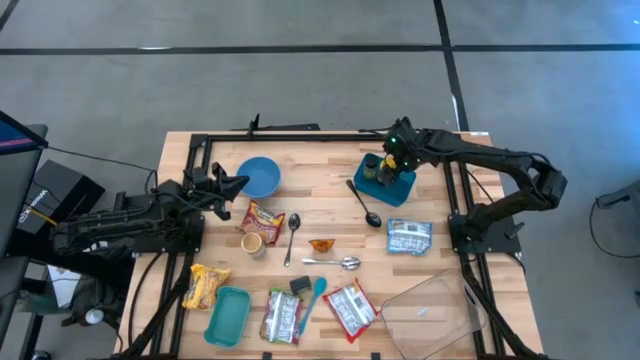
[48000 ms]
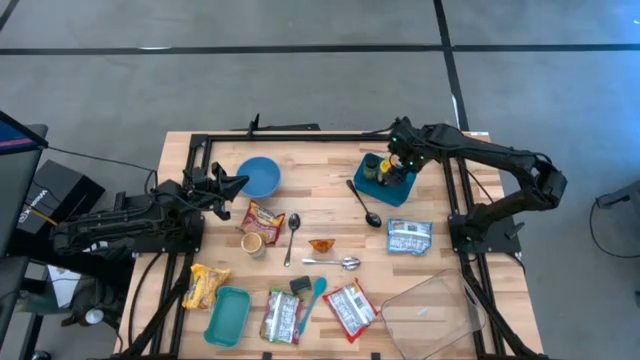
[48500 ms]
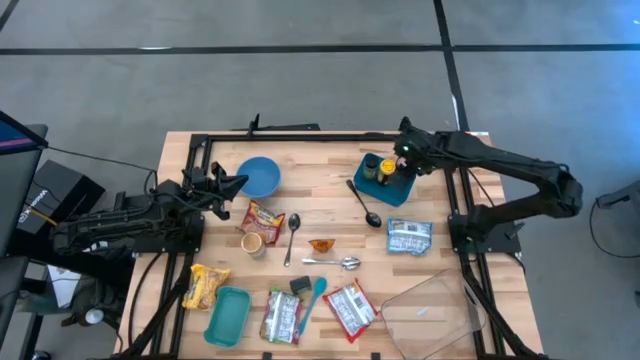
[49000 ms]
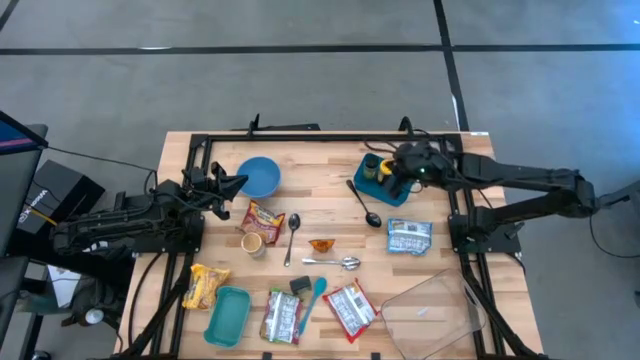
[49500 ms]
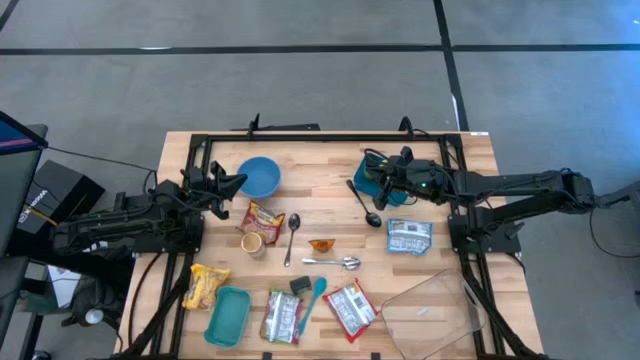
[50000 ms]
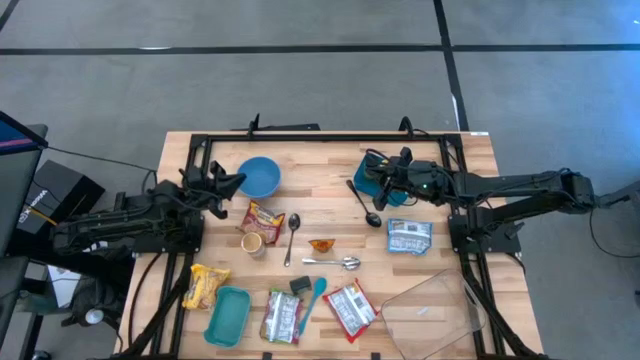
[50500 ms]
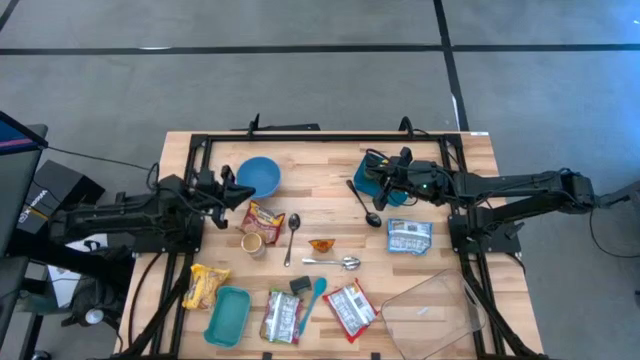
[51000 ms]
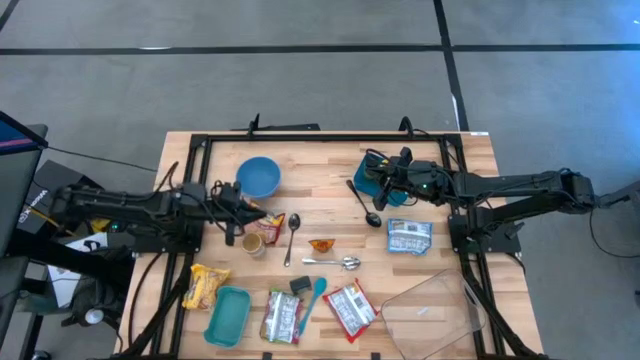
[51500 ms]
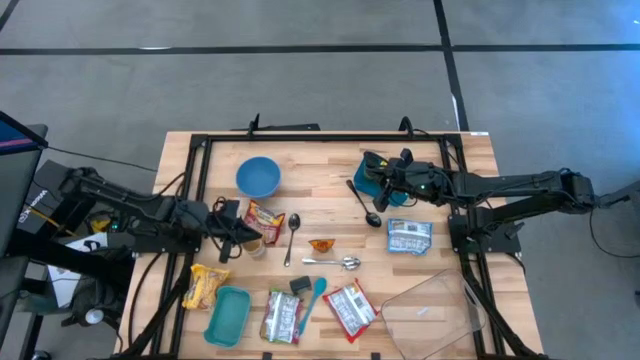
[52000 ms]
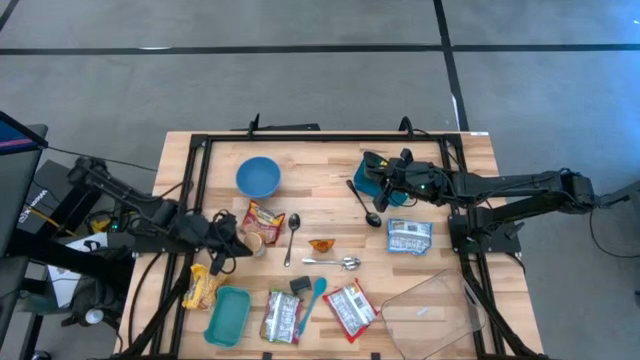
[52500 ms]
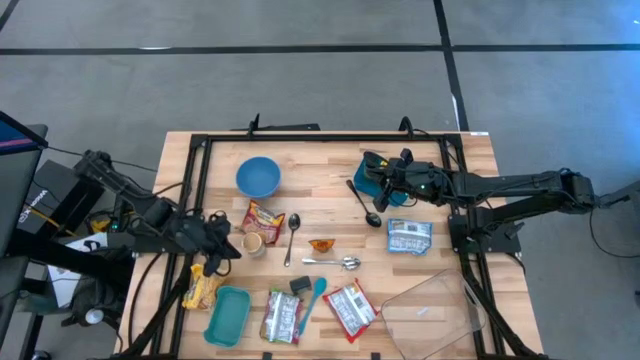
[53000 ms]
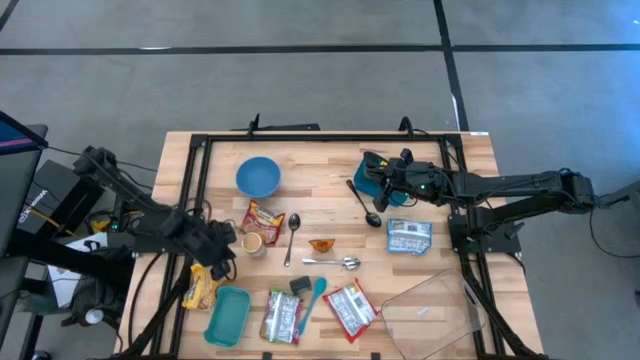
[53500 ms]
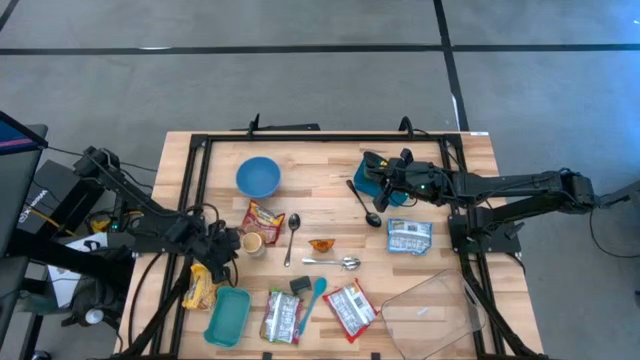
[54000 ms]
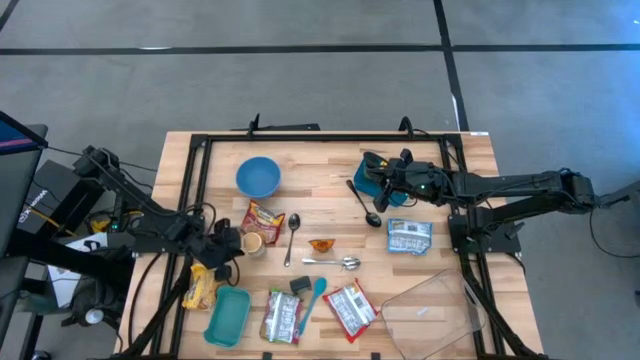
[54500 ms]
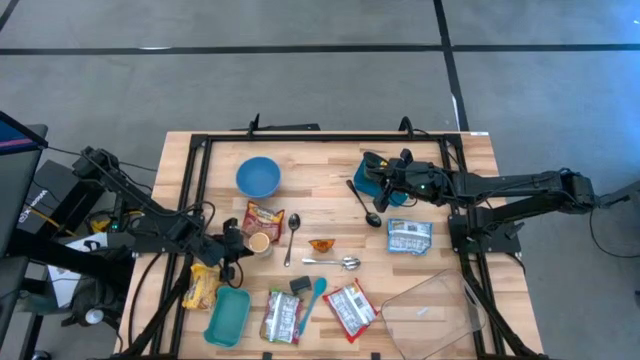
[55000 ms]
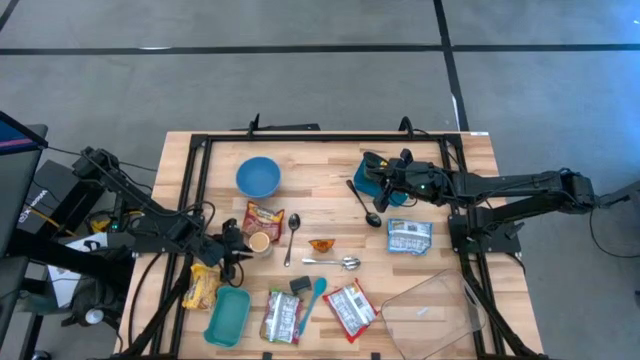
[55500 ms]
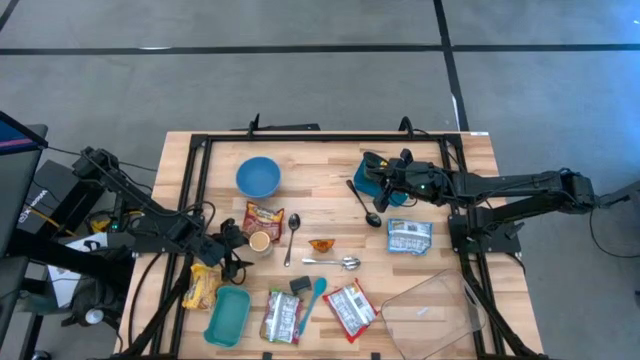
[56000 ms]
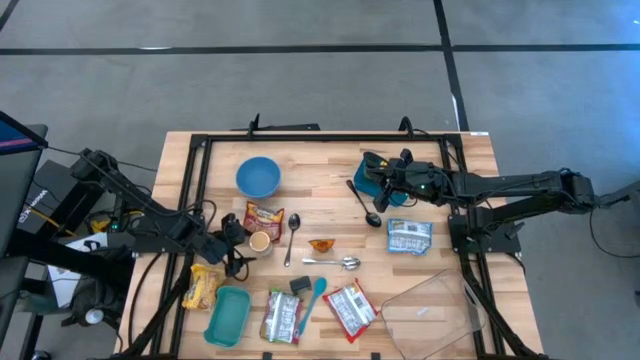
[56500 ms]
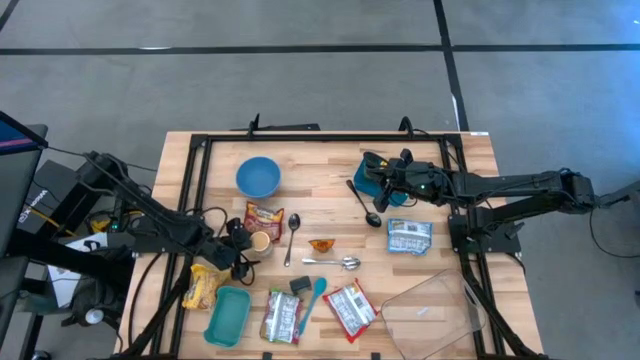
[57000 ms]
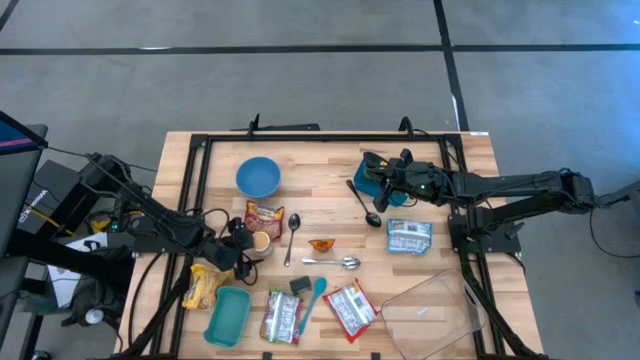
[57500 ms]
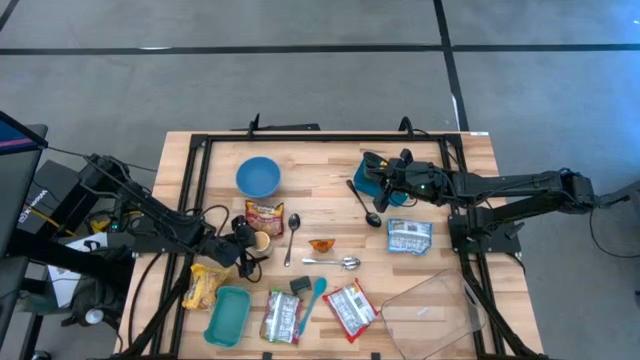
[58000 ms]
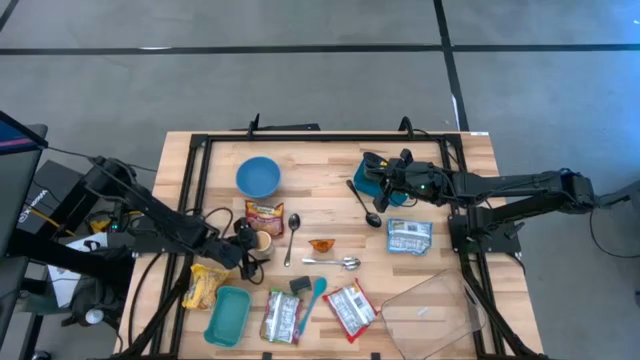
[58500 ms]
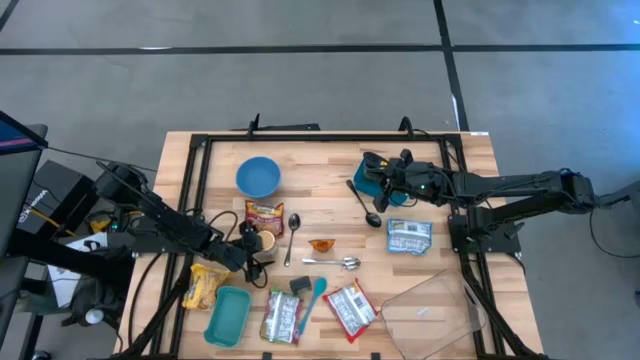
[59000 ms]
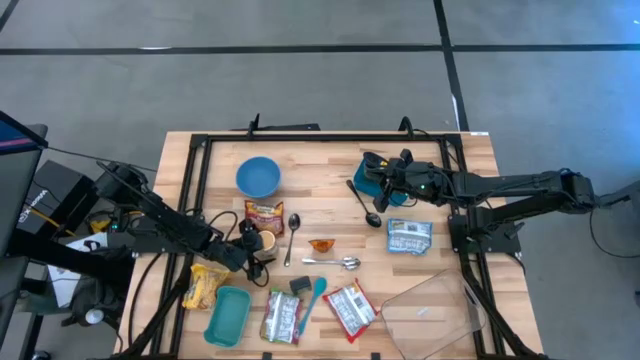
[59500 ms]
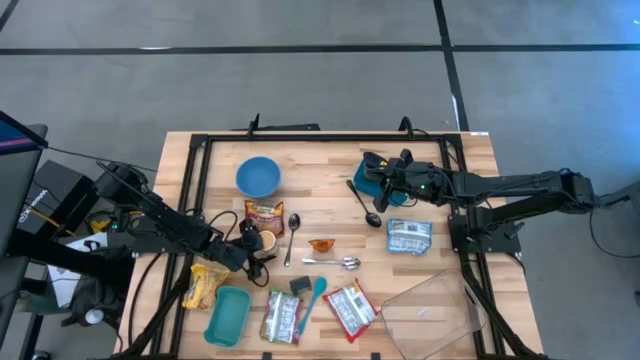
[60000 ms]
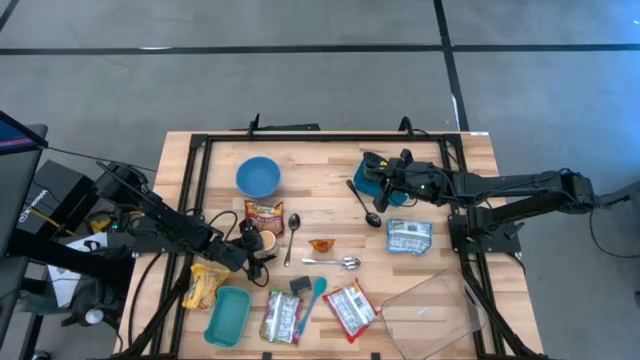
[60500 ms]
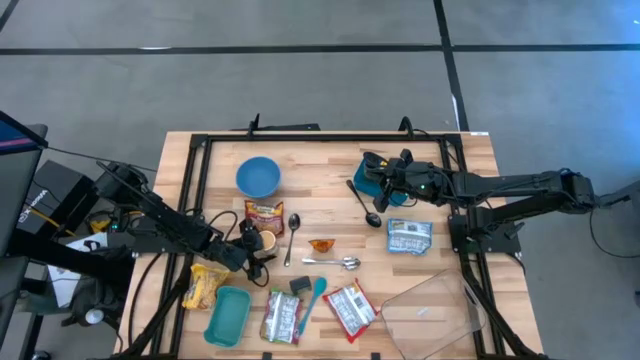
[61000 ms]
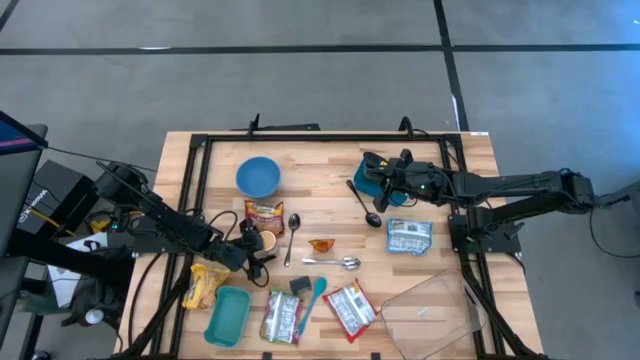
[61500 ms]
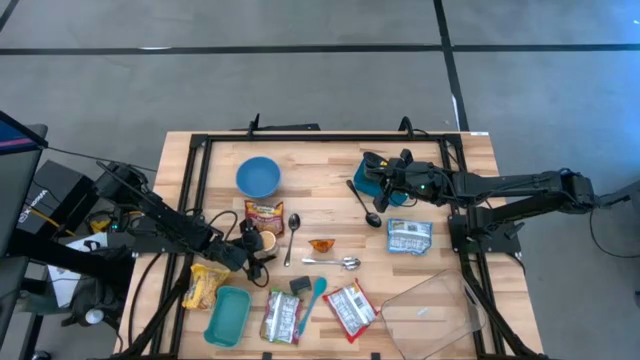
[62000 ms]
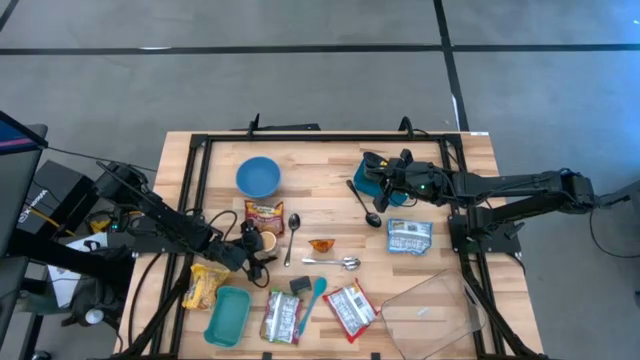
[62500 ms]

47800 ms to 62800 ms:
Task: Pick & Place Food Item
Put the golden seasoning bottle into the blue bin

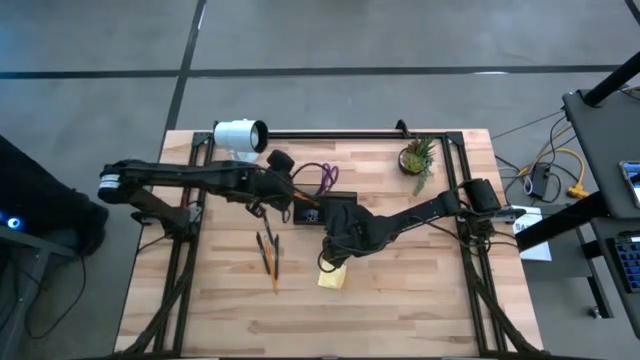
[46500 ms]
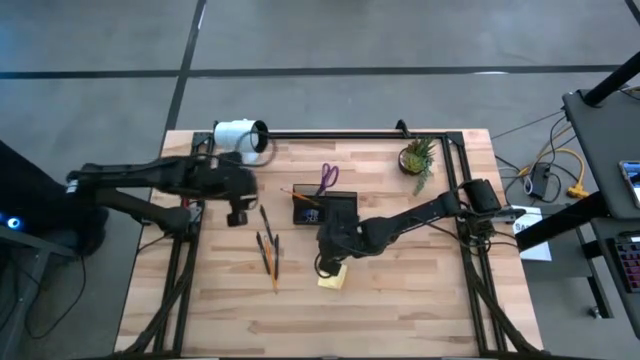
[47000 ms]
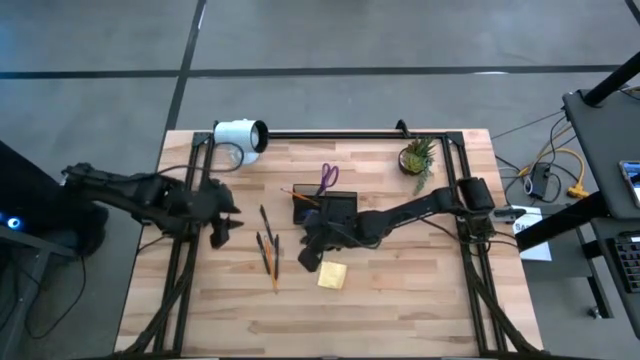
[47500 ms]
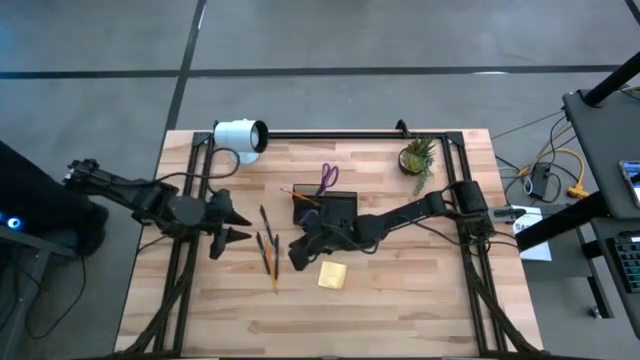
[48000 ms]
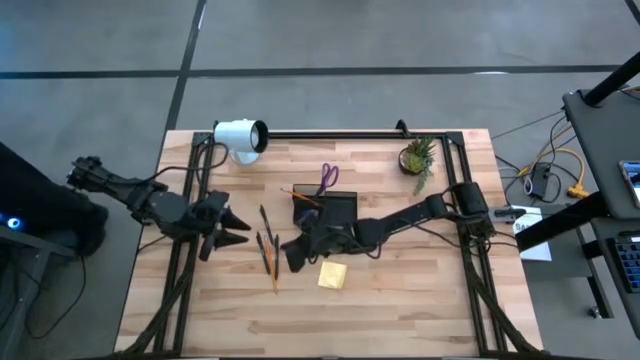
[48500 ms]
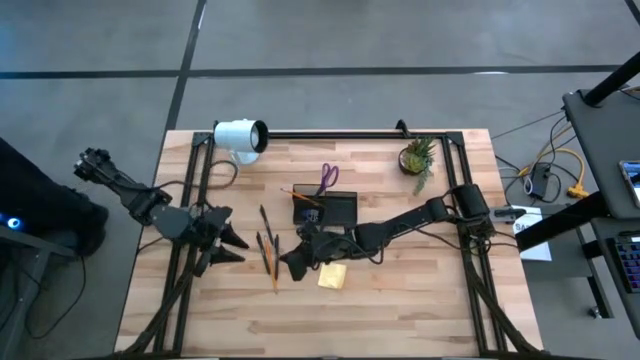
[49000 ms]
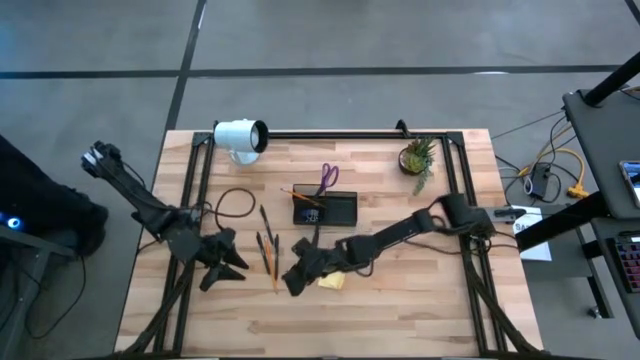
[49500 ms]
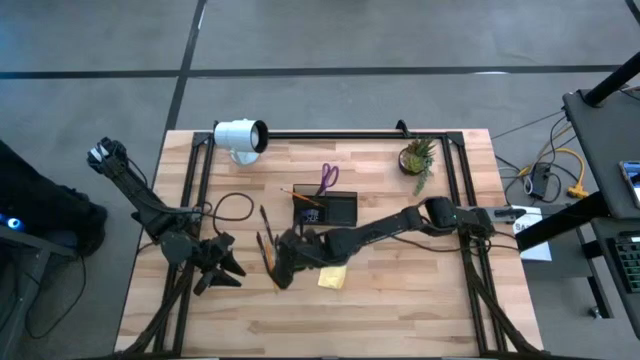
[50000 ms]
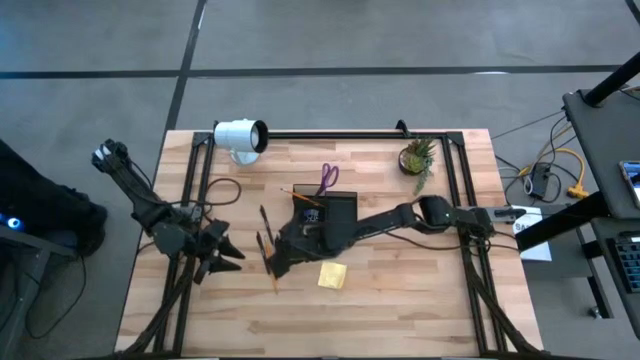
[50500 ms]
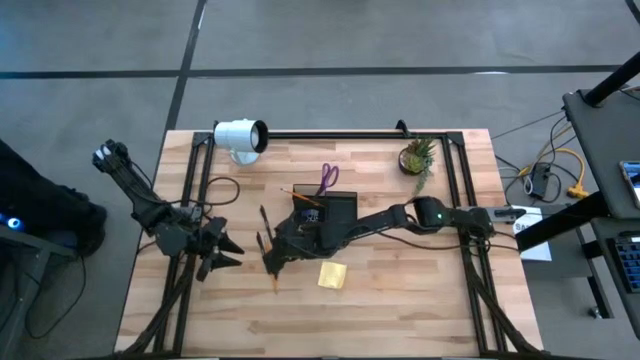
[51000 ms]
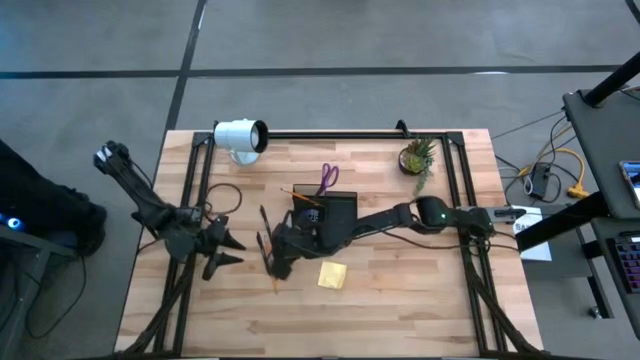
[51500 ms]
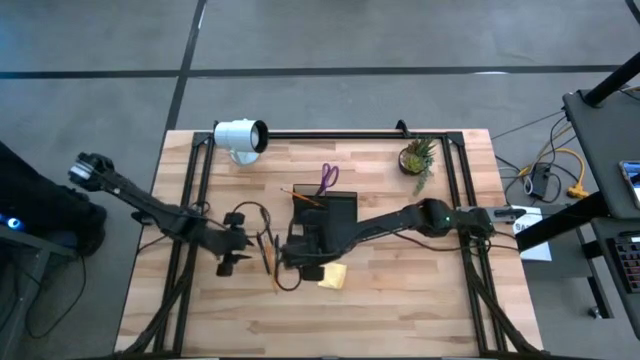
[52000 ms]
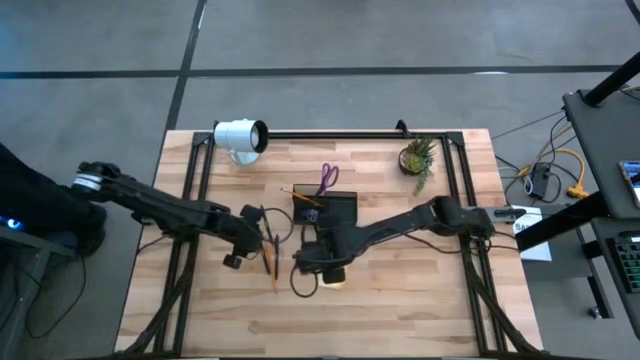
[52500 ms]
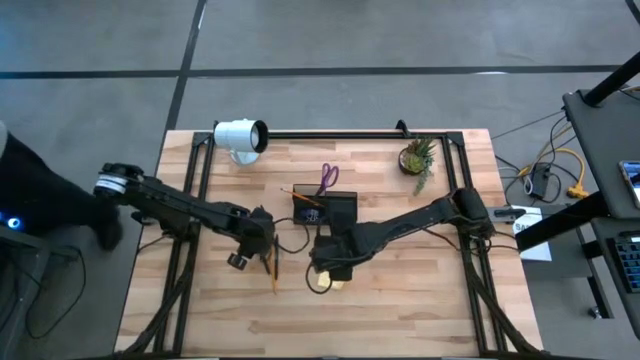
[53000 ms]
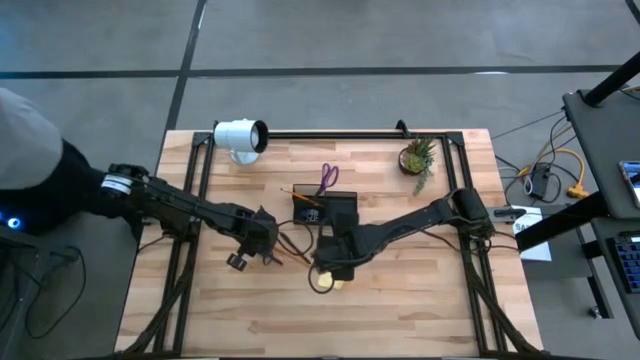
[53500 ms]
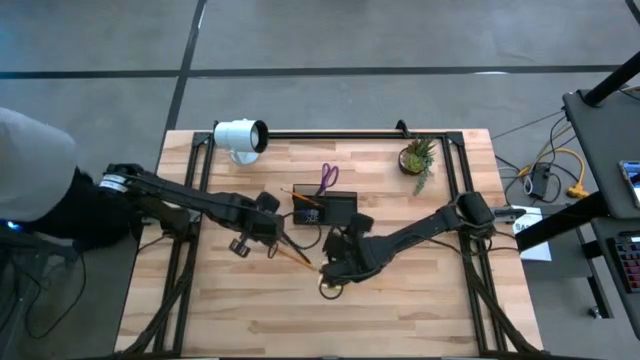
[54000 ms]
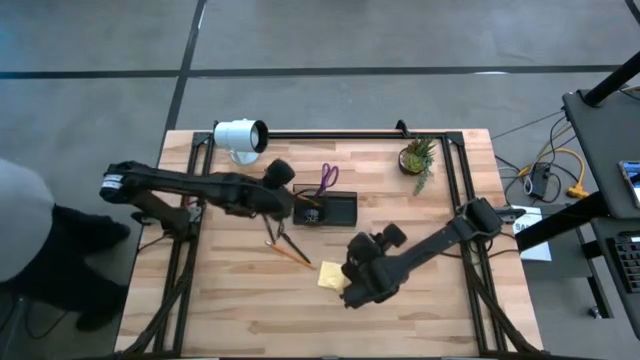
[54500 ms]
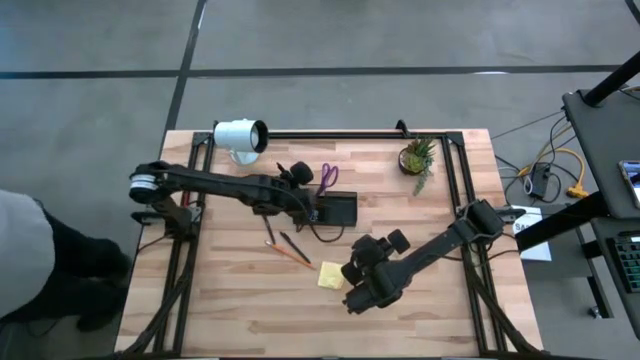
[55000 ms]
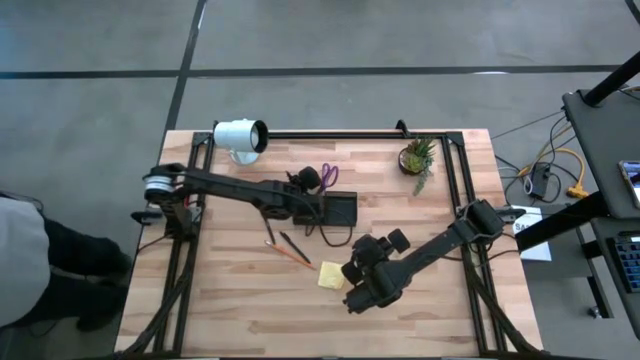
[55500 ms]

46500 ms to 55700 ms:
Task: Pick and place office supplies into organizer
Put the bottom left black pen into the black desk organizer
